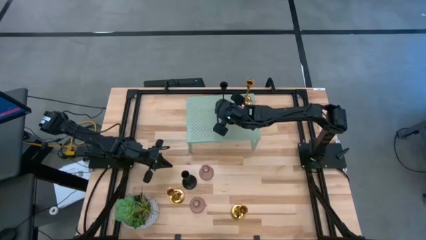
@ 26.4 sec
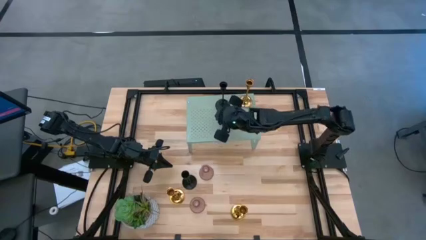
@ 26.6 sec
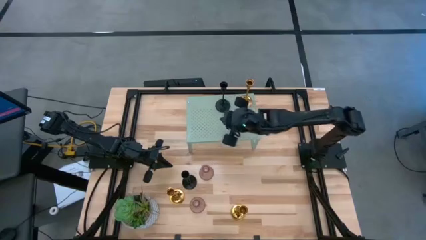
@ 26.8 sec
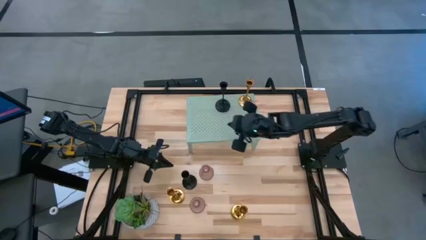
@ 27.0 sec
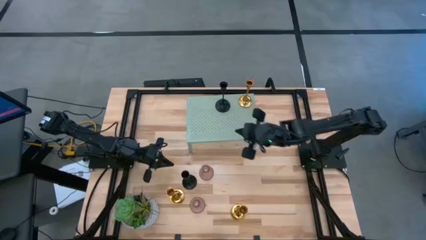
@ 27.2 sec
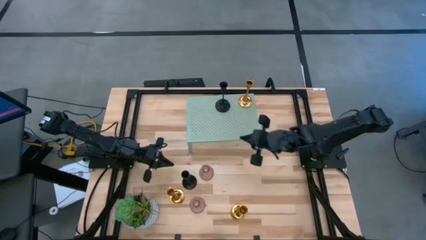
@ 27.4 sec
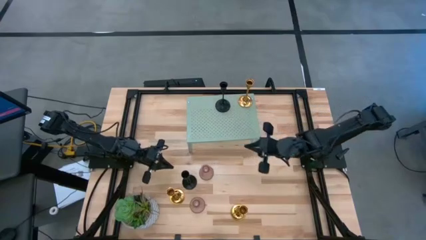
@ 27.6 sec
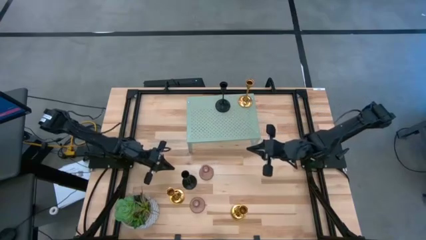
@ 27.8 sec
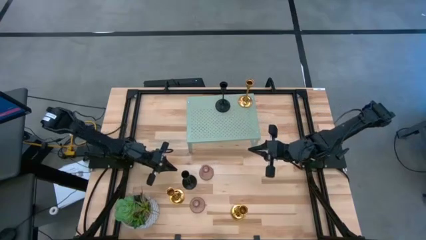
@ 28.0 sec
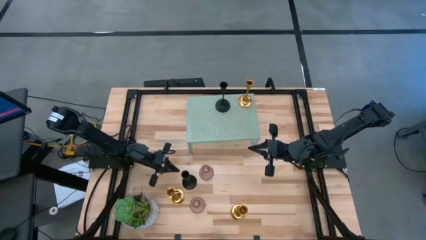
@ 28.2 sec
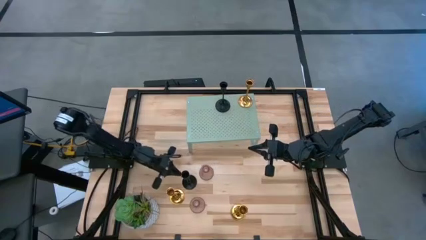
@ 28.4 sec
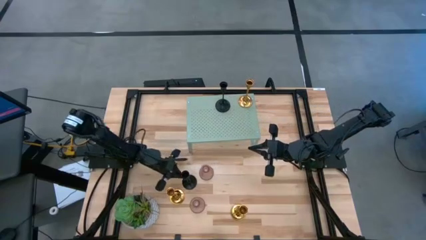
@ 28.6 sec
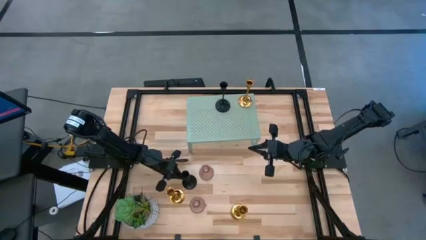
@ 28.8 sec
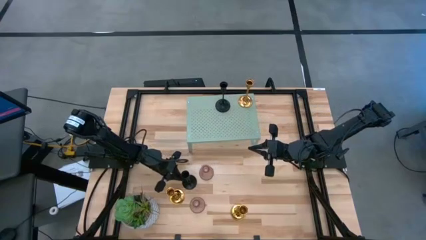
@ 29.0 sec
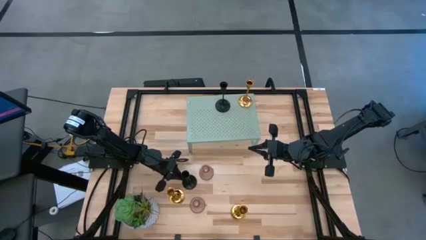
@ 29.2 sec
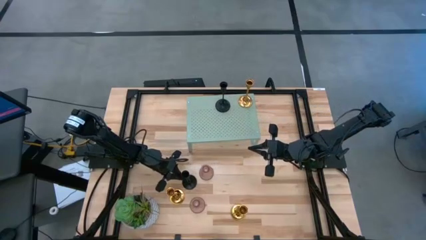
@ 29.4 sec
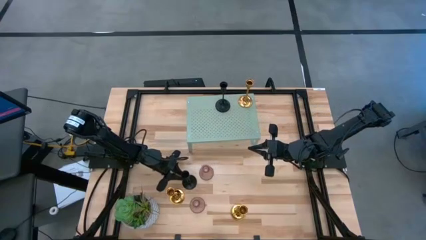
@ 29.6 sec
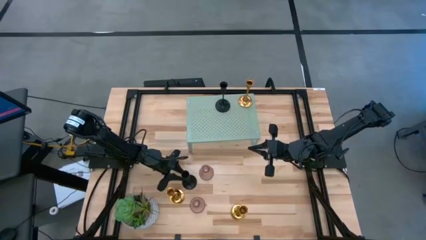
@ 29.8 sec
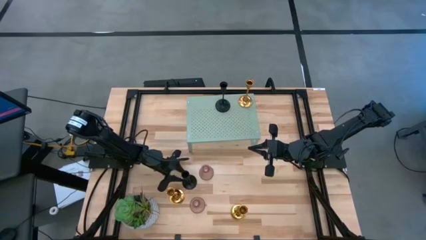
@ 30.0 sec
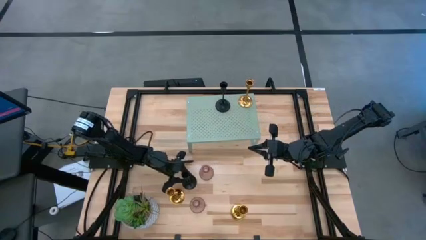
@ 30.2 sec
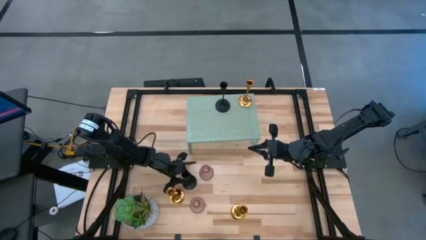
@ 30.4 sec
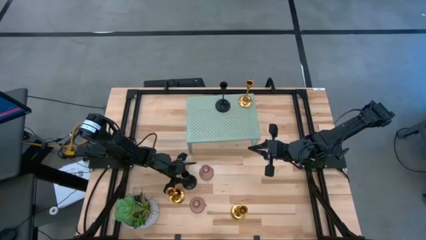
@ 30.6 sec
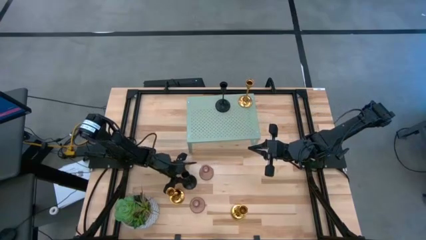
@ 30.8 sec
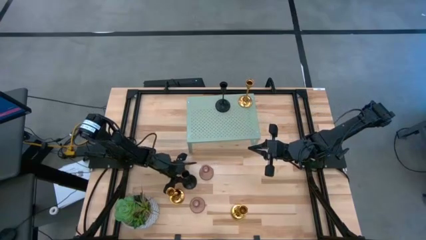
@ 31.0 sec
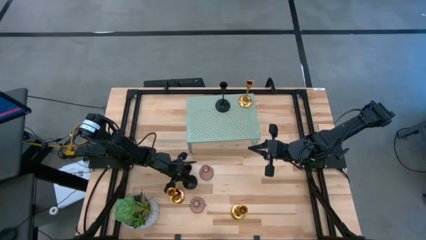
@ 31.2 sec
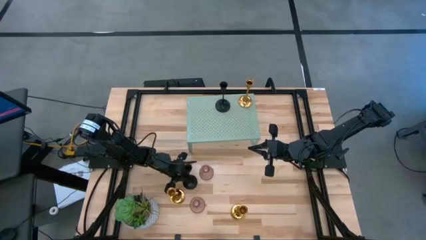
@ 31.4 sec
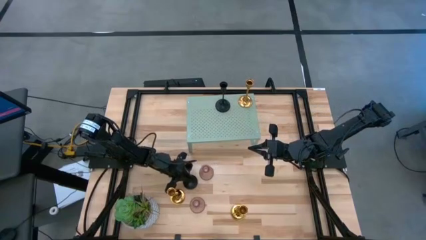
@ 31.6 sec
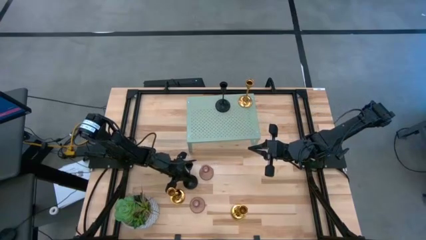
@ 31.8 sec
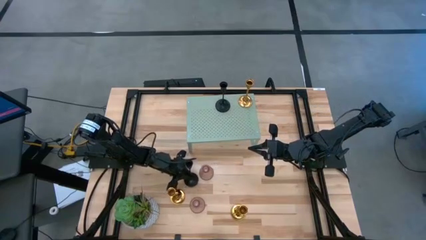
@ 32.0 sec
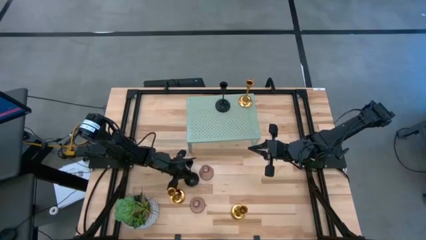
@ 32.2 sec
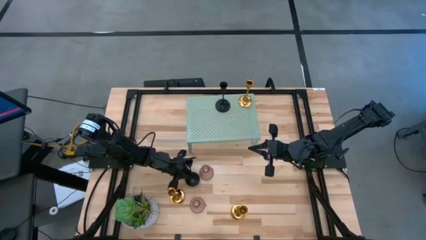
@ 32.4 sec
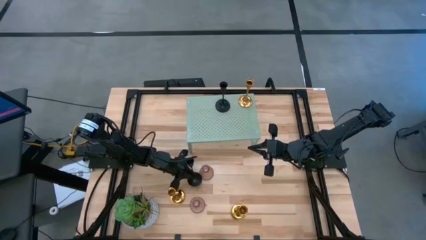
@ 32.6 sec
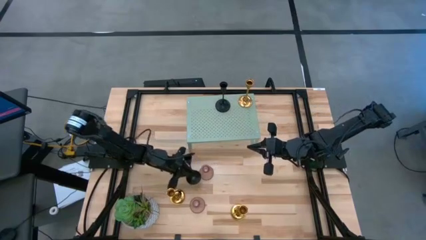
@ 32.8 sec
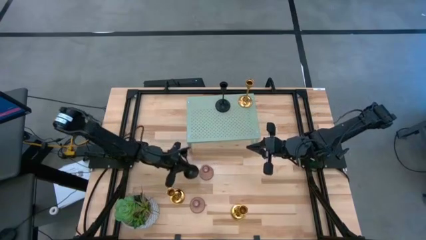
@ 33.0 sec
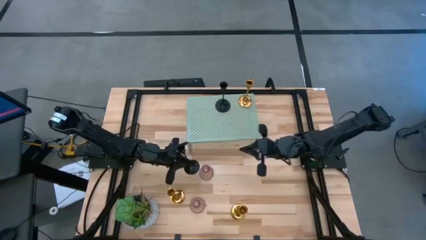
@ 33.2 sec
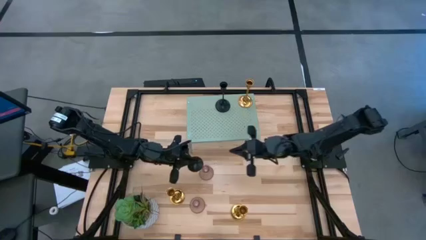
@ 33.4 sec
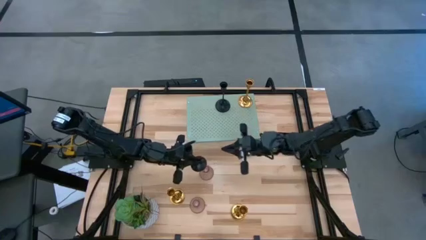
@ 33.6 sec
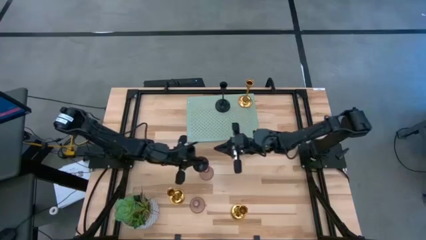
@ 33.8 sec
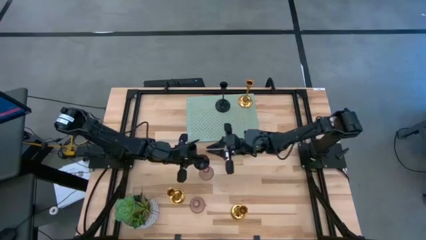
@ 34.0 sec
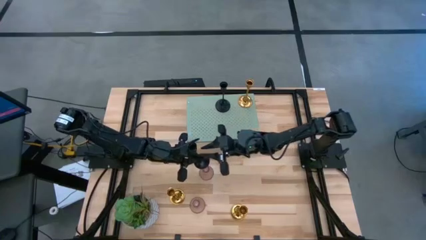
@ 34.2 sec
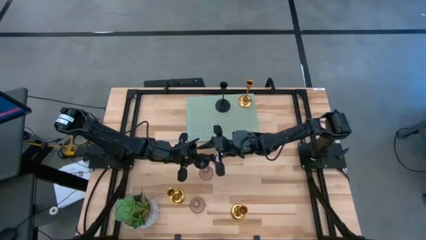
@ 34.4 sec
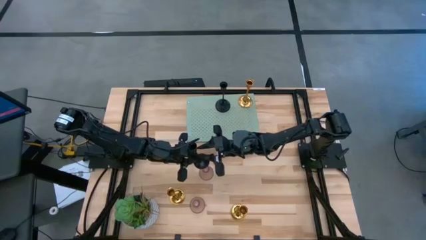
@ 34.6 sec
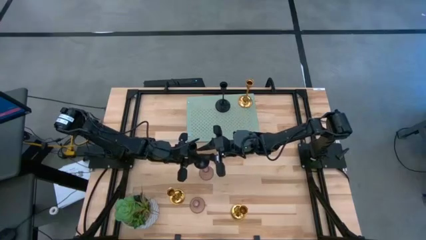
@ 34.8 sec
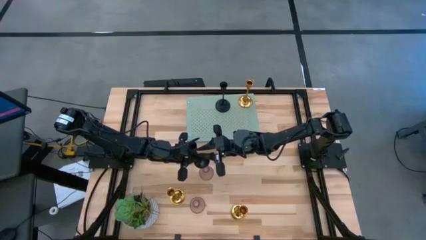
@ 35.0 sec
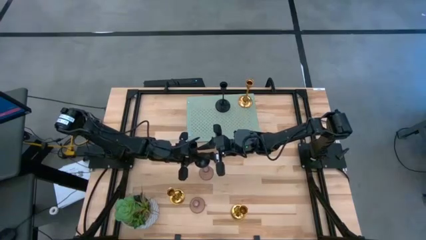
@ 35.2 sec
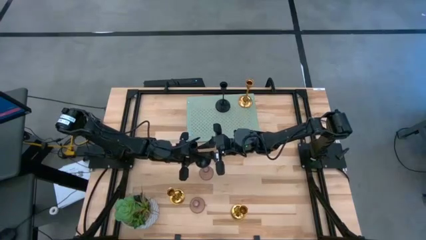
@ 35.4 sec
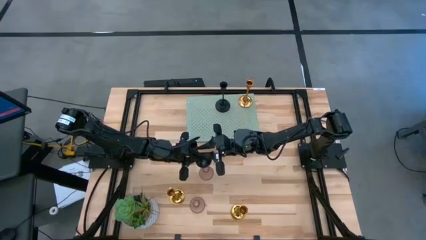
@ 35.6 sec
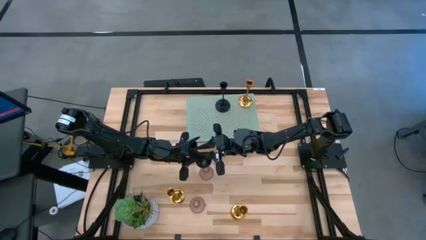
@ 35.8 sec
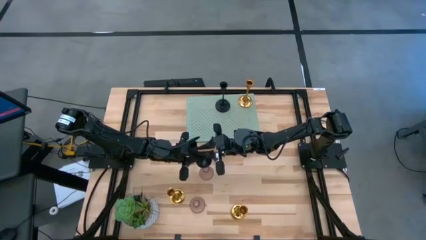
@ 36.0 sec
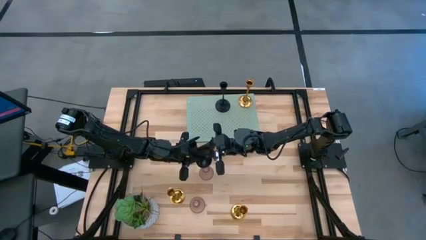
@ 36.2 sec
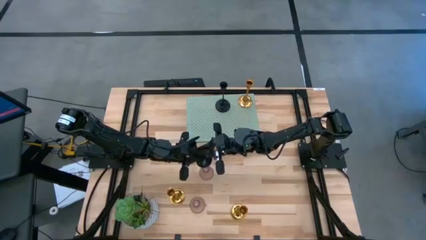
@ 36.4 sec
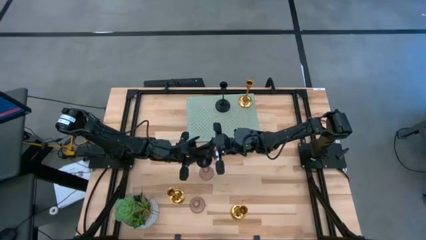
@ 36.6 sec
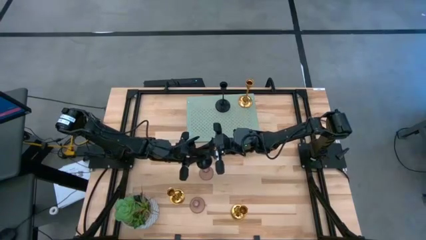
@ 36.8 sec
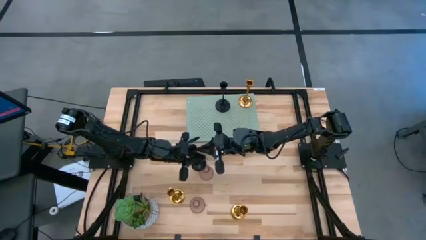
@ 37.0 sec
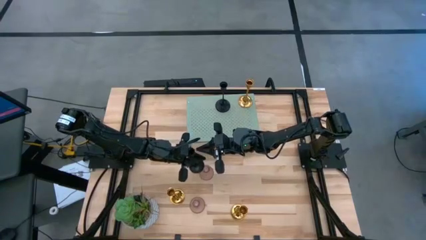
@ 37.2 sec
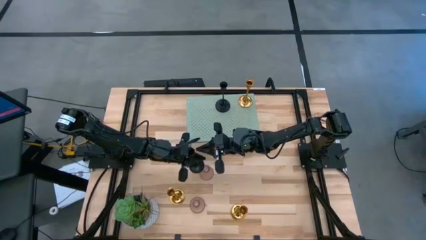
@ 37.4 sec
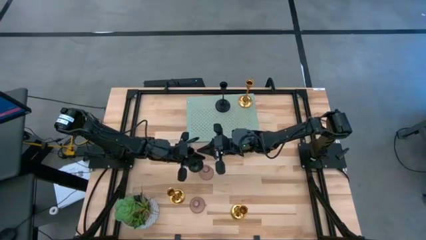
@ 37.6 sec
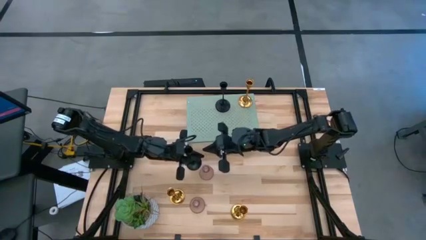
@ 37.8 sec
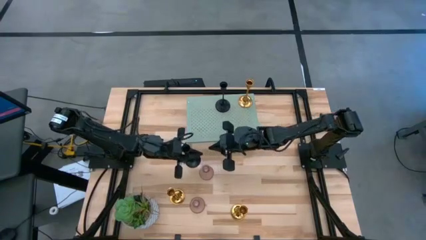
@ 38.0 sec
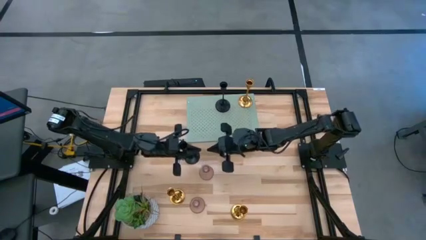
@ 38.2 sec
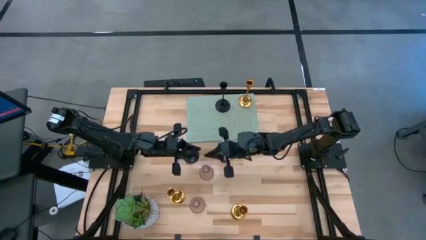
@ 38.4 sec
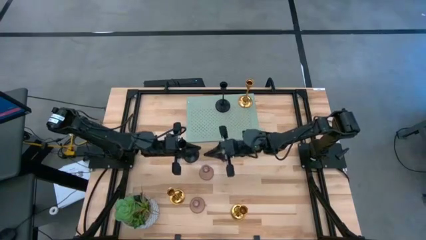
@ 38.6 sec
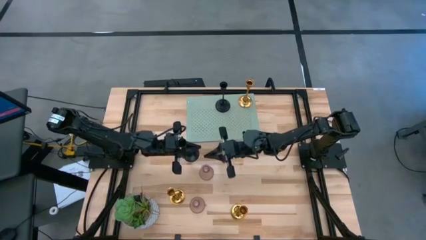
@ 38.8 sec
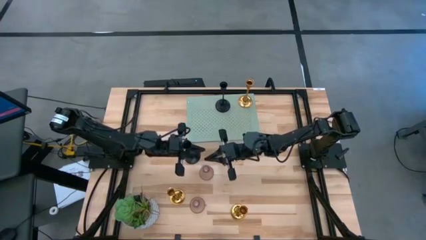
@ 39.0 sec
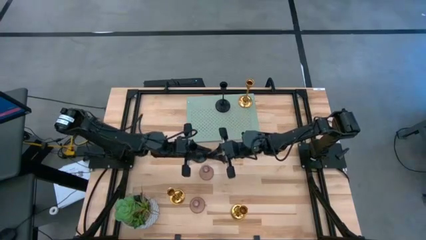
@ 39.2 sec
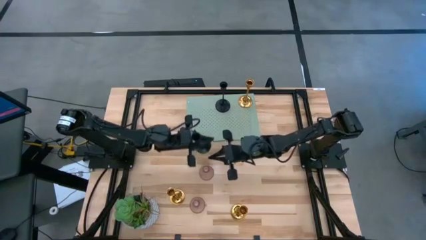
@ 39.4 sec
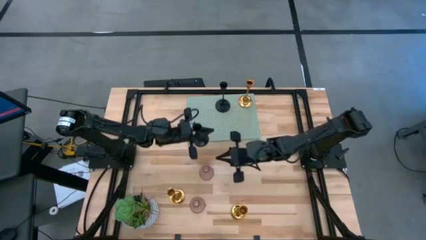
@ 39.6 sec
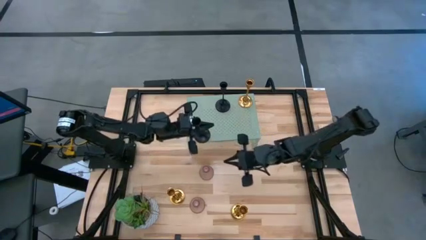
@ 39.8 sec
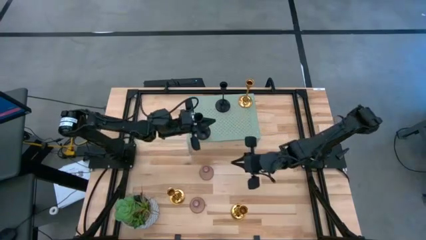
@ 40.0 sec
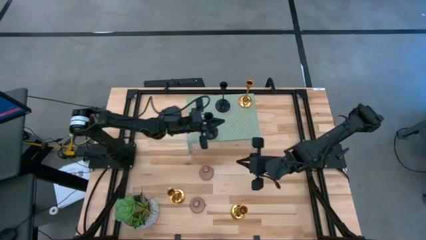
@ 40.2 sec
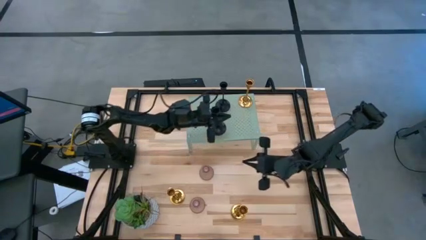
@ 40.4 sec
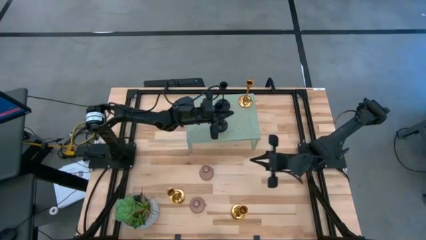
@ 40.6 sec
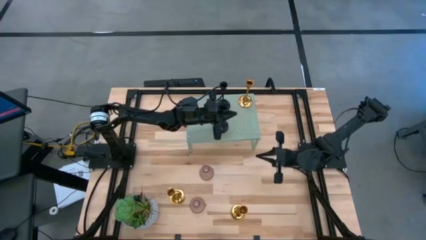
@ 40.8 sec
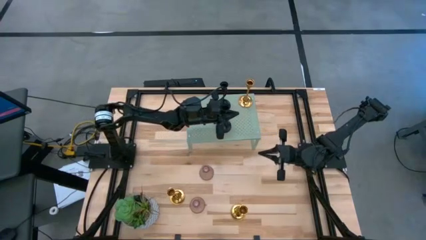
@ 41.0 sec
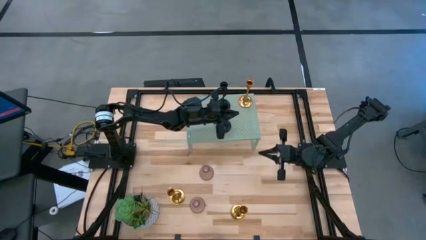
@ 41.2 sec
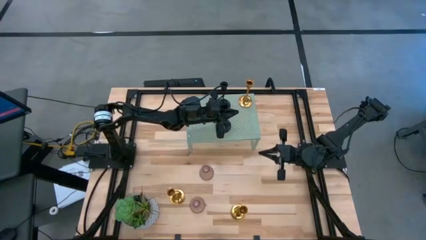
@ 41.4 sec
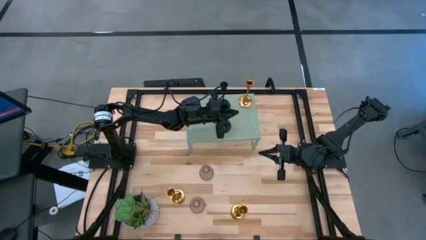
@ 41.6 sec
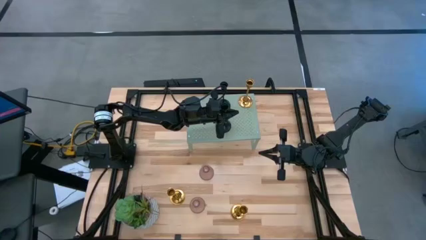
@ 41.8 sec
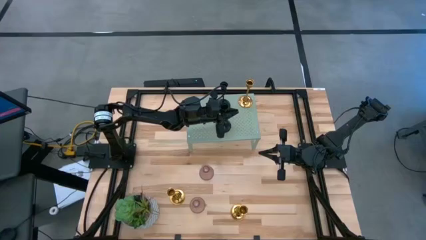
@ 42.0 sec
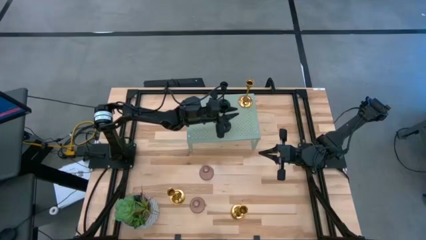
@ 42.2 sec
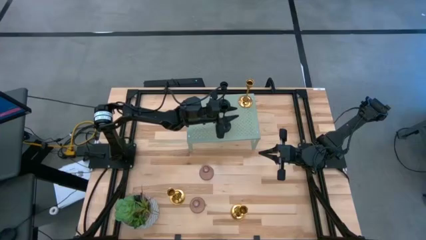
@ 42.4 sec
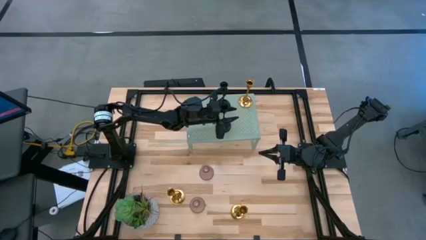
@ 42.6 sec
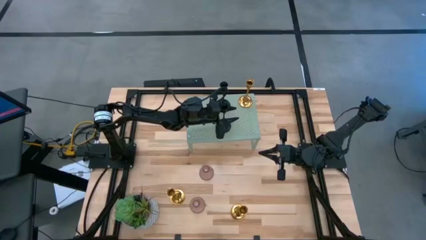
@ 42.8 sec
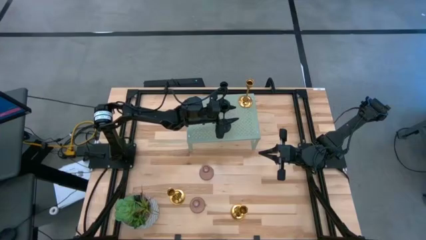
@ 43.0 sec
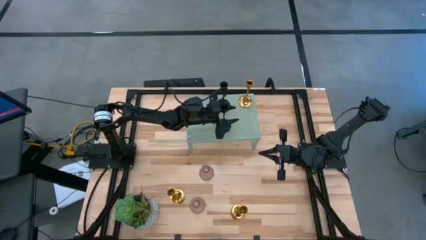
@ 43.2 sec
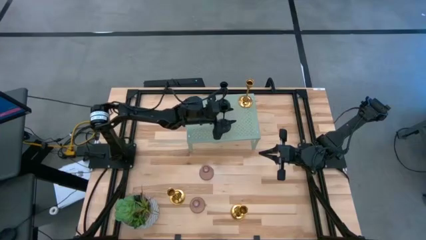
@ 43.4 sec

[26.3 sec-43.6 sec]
Task: Pick & Place candle stick holders
Put the black candle holder on the shelf aligned with the other black candle holder
